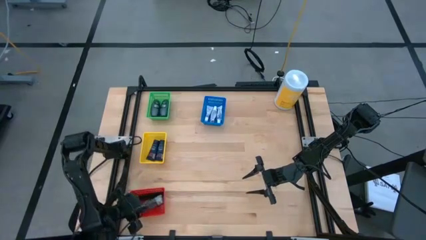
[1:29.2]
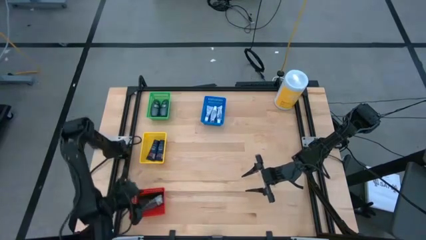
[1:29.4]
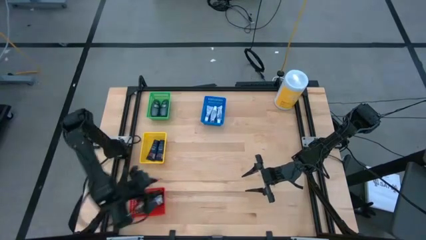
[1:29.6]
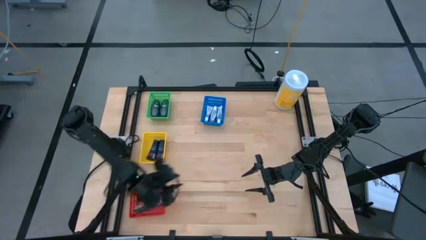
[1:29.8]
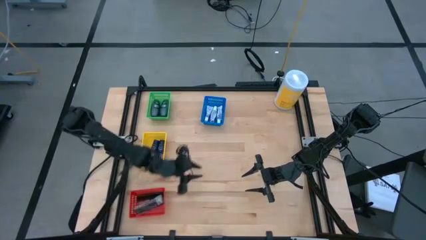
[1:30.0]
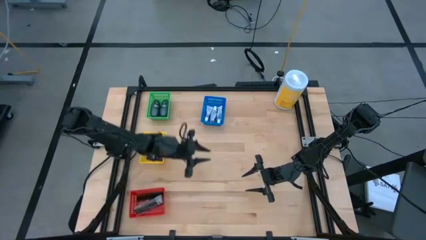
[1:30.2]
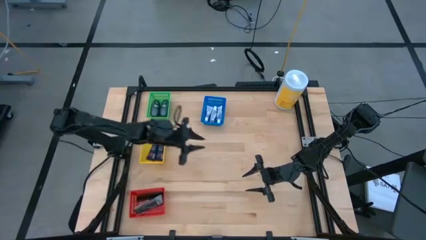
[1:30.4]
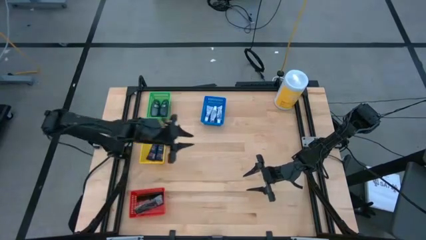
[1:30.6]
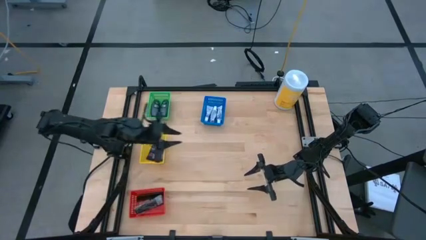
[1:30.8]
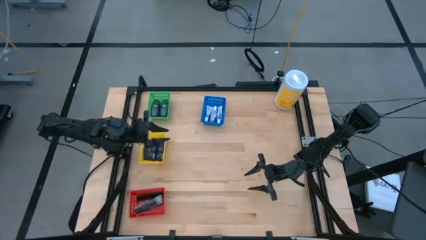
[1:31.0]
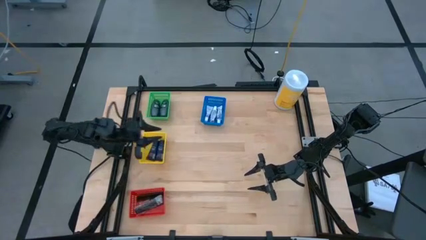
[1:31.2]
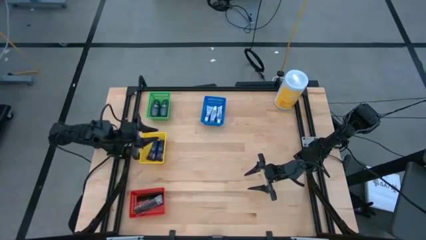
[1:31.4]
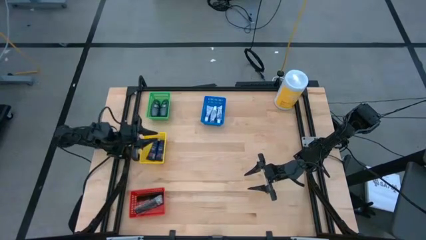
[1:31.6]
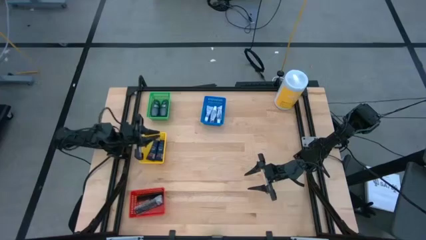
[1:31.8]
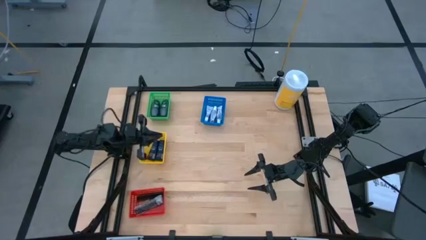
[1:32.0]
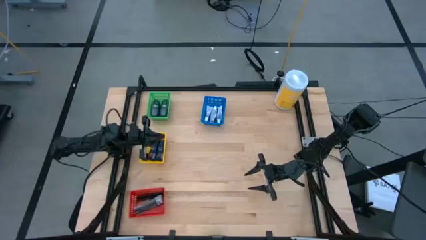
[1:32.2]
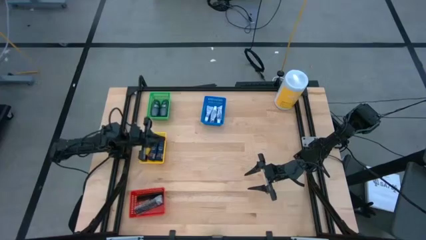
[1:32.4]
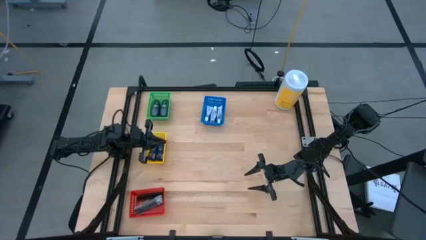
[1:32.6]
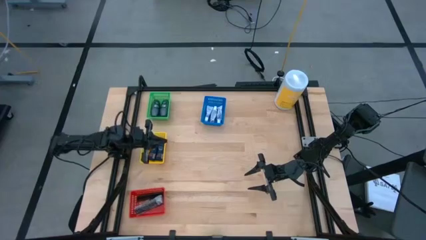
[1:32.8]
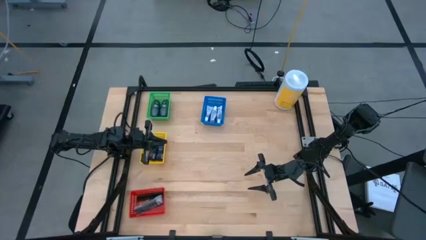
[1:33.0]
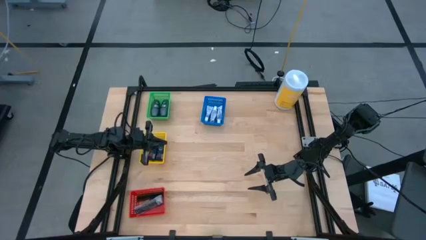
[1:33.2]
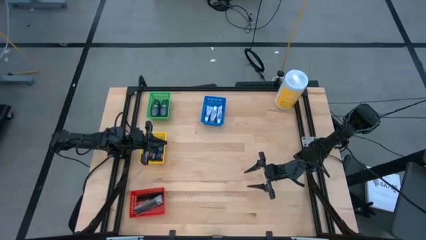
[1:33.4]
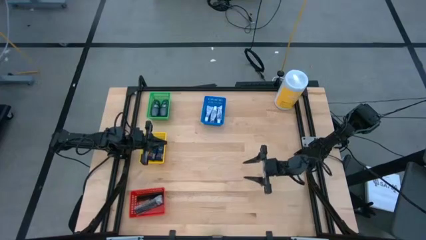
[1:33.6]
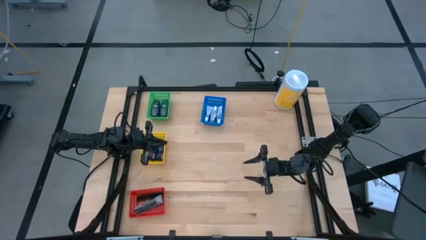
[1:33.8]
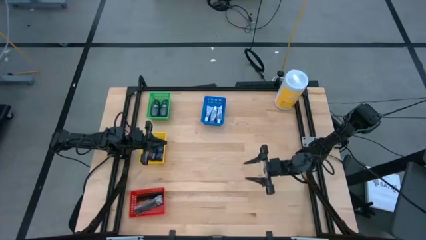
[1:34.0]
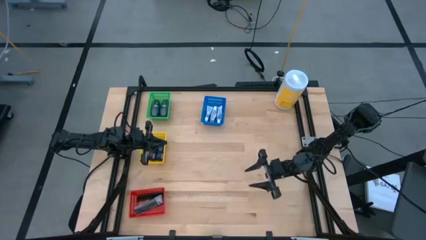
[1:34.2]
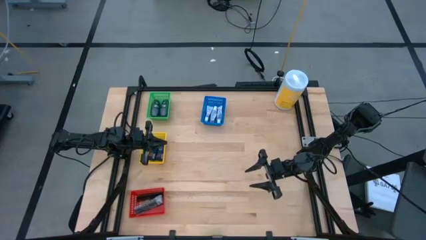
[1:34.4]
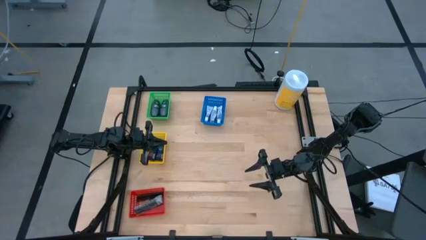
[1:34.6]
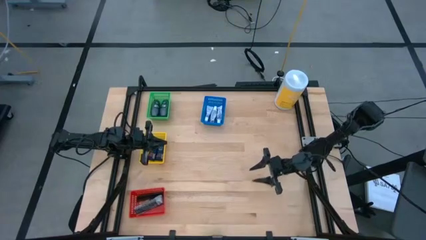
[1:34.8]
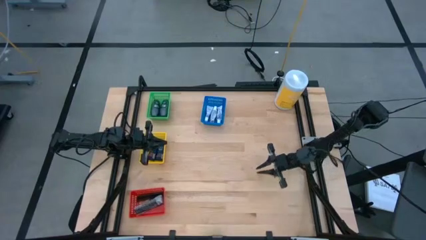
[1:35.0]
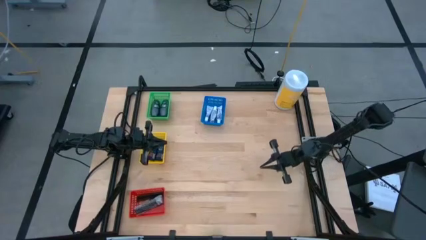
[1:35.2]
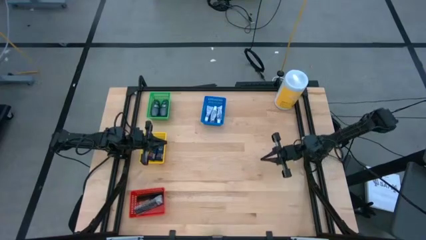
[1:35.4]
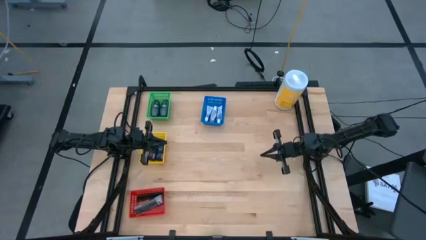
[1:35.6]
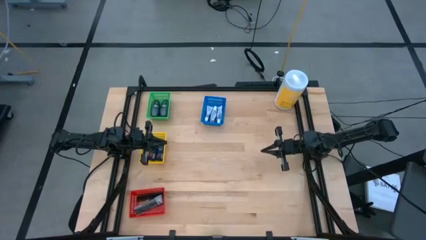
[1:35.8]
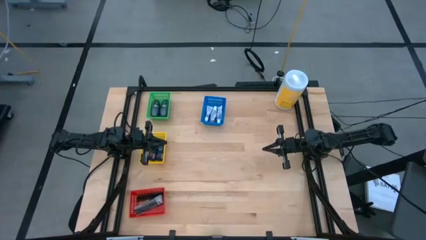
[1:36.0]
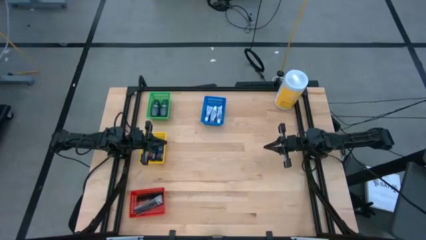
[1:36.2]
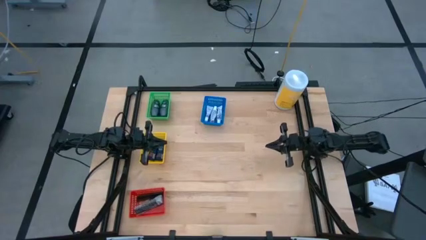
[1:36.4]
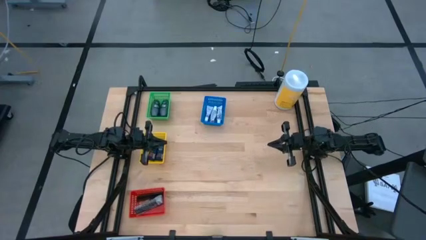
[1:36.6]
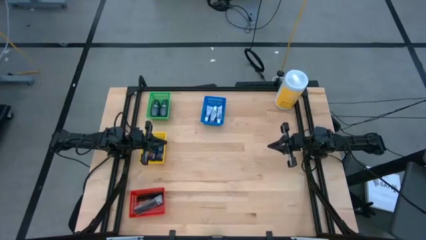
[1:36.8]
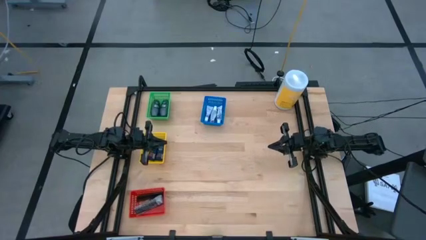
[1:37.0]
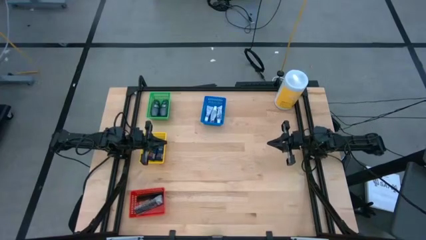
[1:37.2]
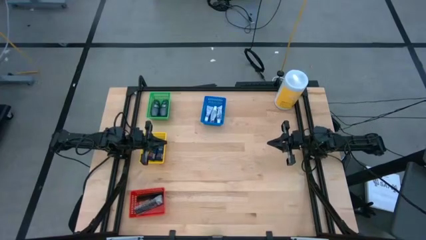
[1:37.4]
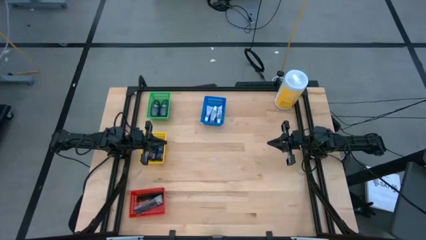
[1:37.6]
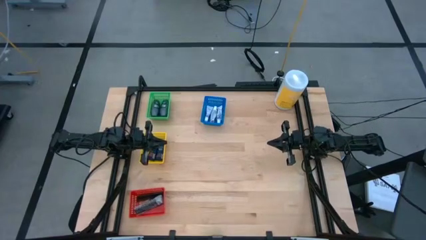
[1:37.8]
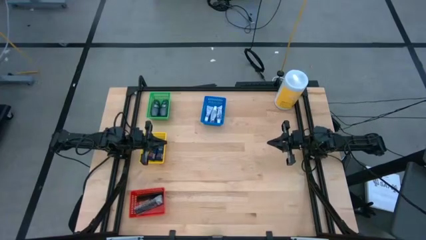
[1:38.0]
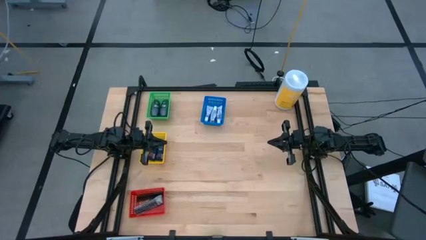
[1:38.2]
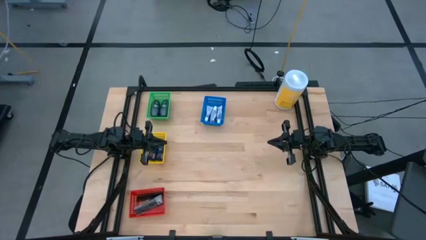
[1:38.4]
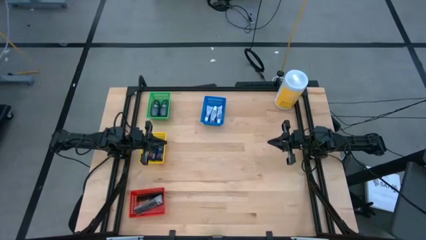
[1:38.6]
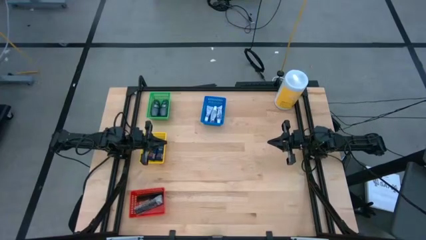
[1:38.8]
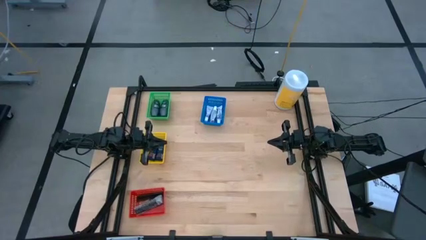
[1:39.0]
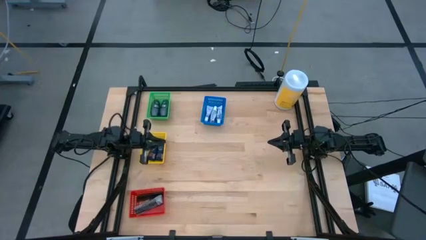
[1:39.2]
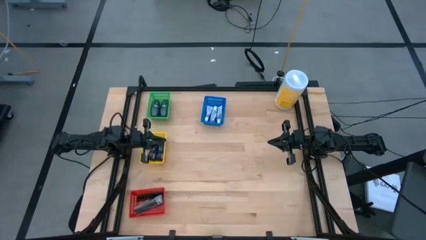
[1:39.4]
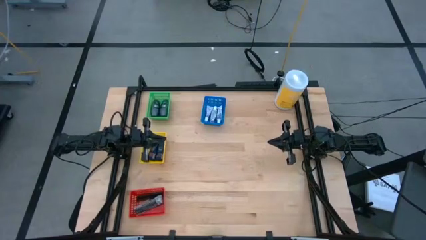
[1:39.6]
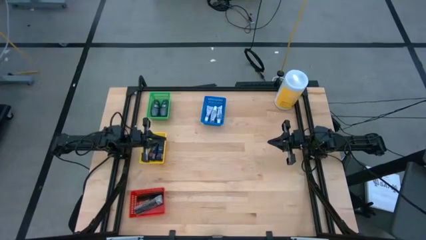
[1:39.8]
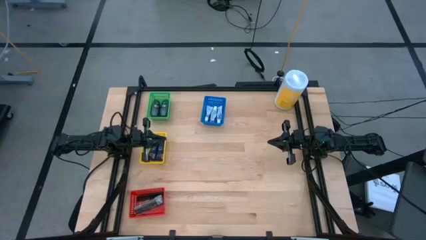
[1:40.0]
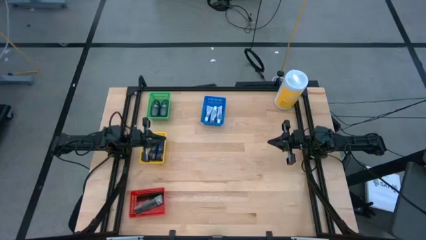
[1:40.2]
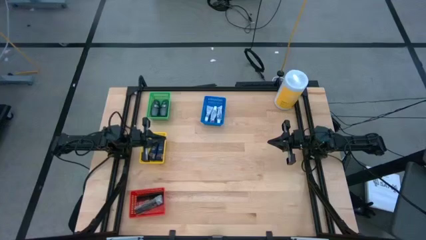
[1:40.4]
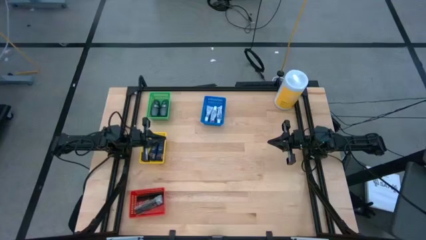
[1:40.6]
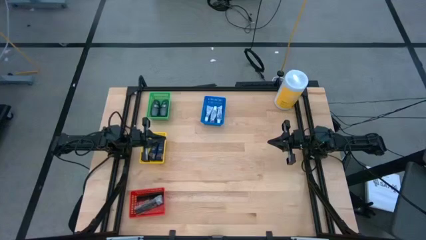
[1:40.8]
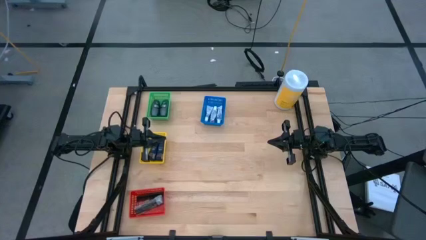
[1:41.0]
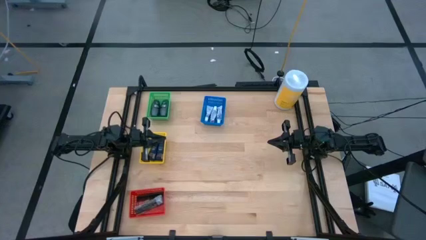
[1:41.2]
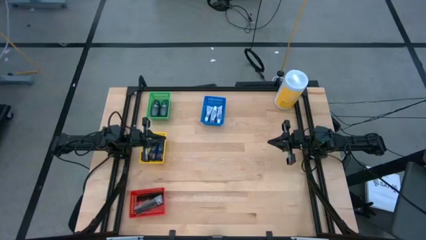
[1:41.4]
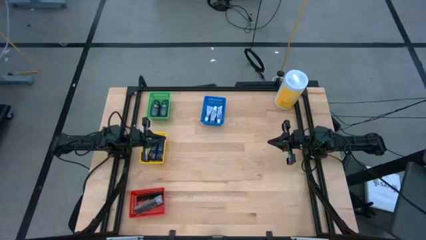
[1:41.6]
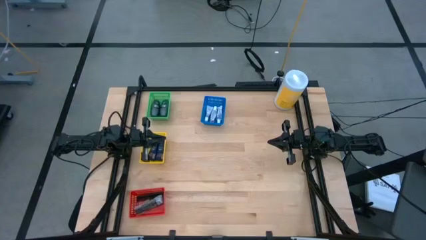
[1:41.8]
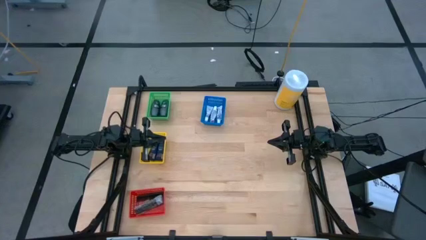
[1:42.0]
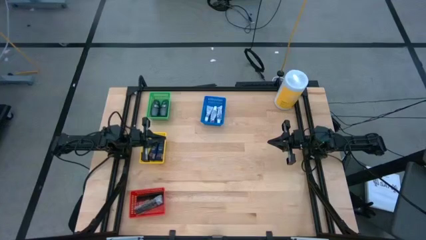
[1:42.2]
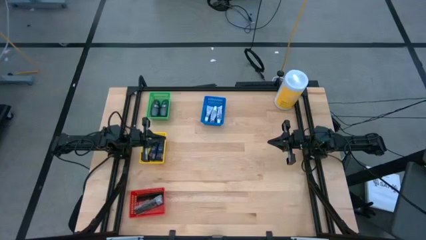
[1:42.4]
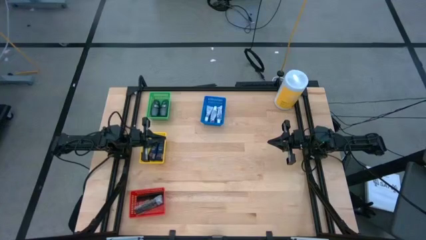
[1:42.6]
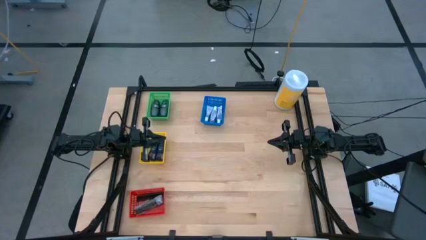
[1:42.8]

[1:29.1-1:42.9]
Task: Pick & Place Travel size toiletries
Return to Home Position

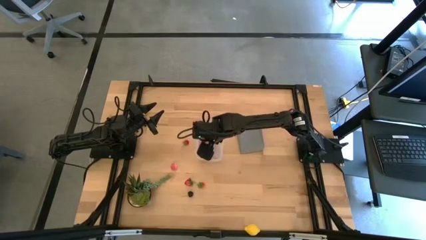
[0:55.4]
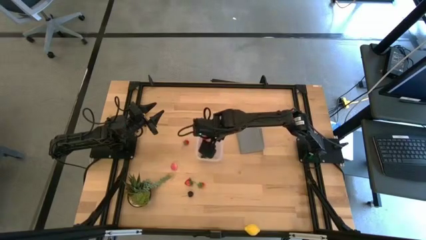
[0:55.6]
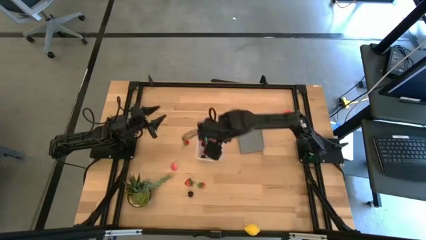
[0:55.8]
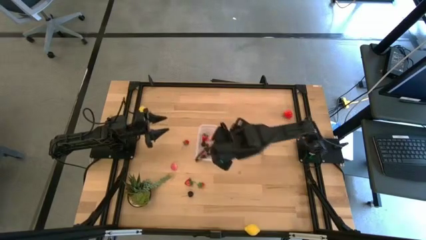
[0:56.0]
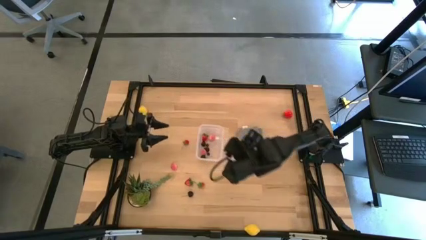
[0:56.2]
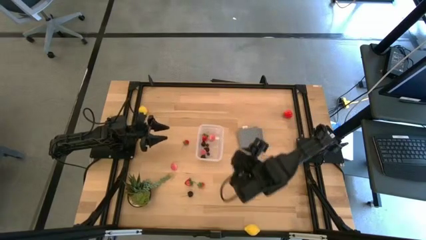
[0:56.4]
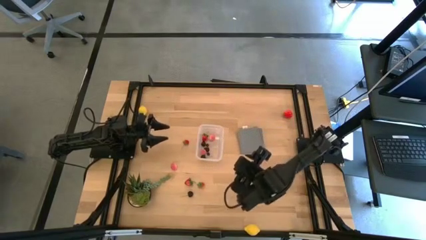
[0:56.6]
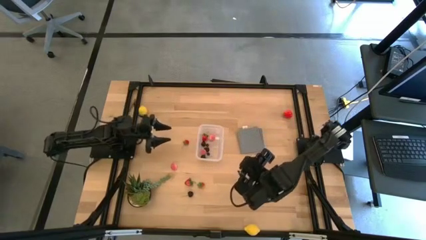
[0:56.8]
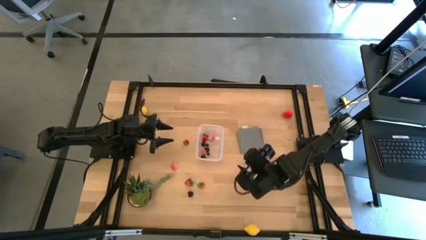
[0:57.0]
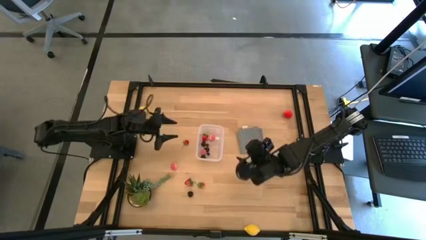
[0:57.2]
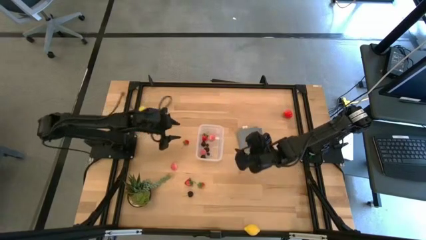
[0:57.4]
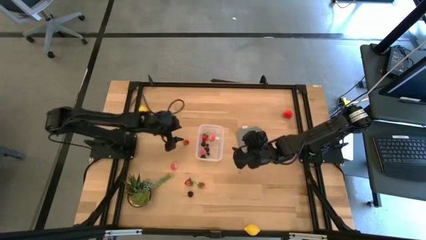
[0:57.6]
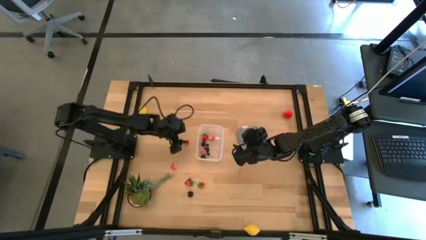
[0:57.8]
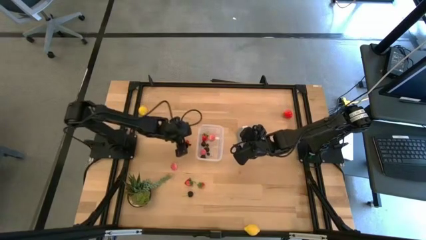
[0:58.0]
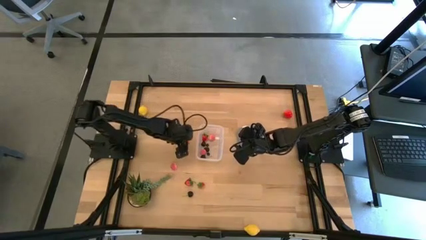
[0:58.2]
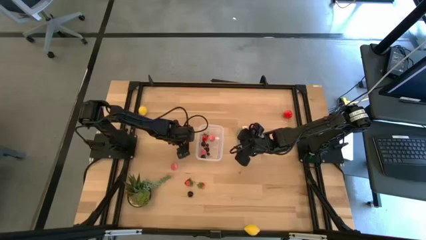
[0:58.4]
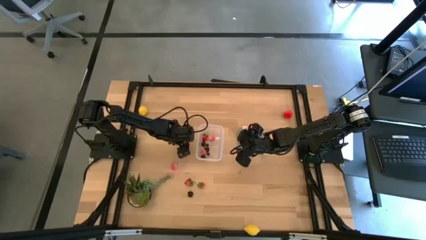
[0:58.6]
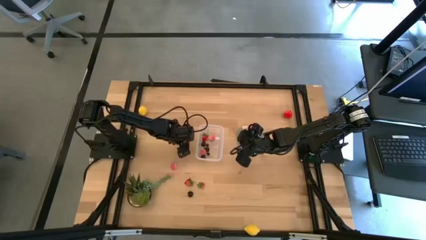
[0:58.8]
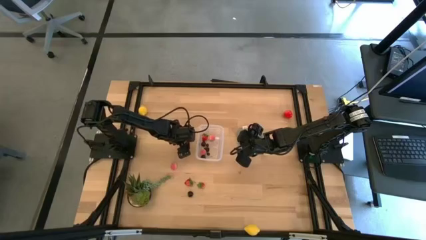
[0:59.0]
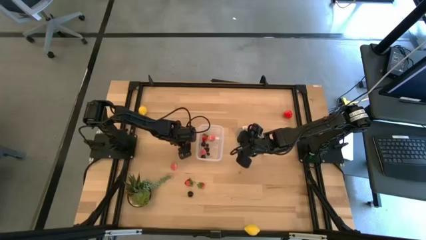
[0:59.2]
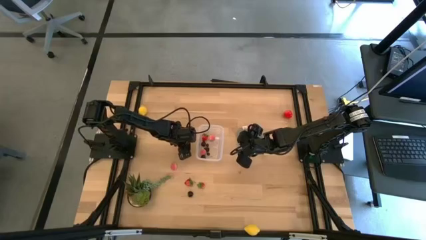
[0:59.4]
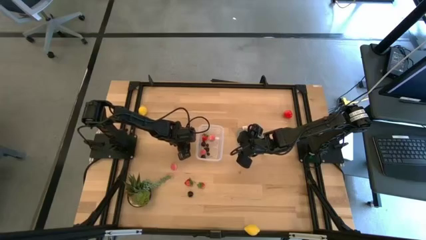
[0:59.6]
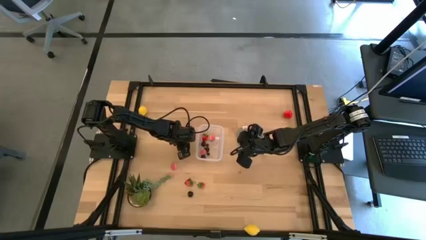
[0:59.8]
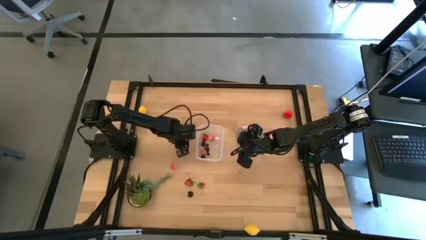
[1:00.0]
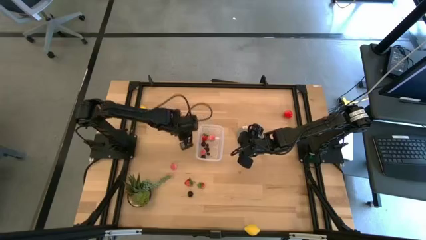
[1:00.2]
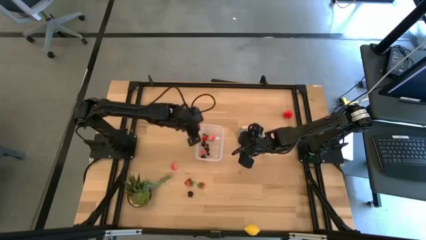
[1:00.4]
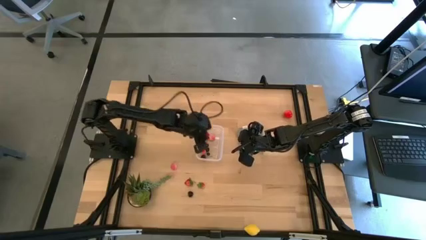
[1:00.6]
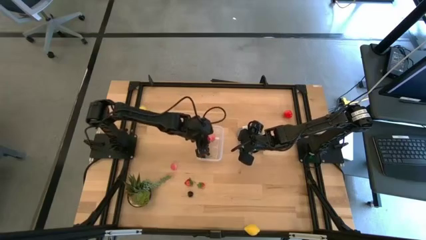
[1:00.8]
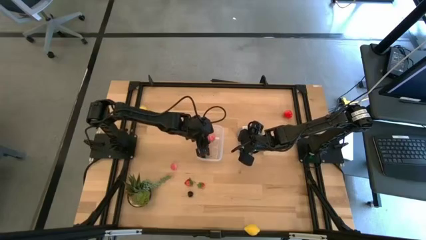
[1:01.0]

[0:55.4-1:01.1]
Task: Pick and placing Produce into tupperware
Put the strawberry into the transparent bin
